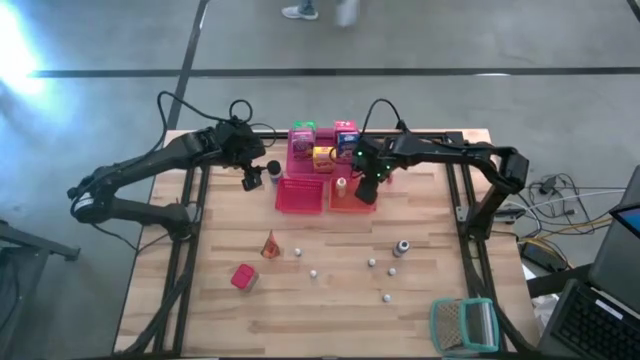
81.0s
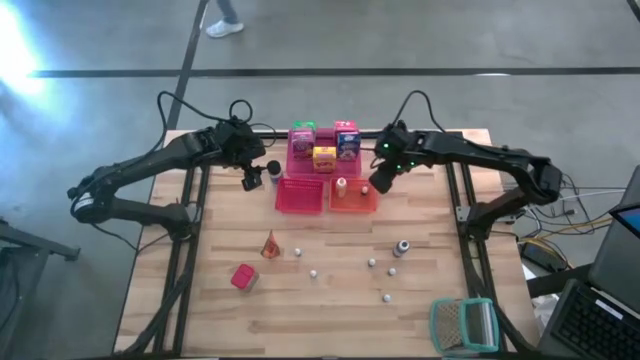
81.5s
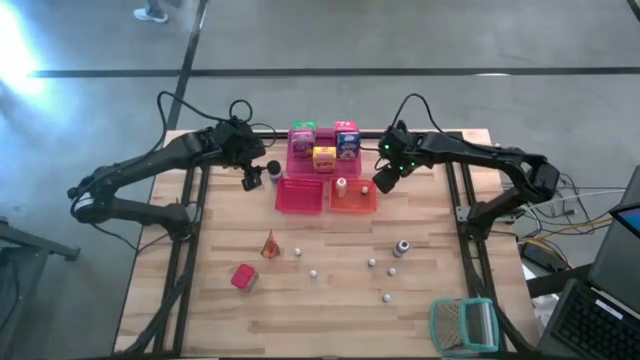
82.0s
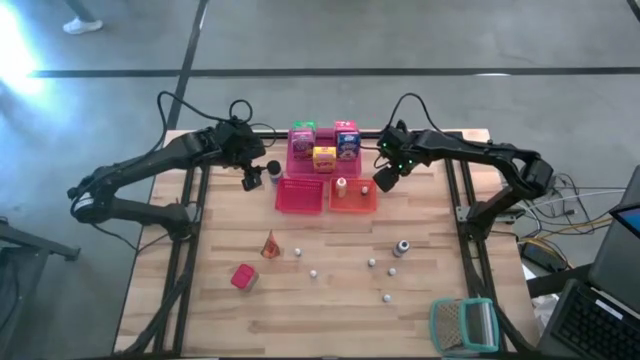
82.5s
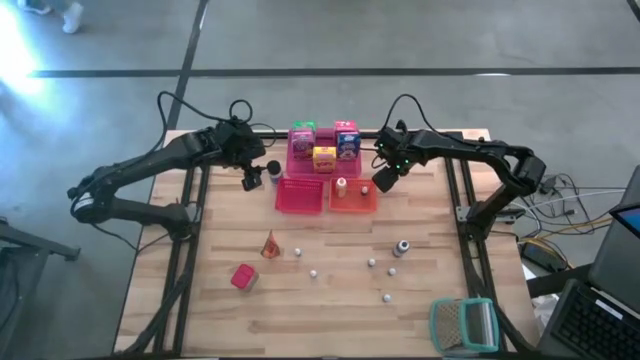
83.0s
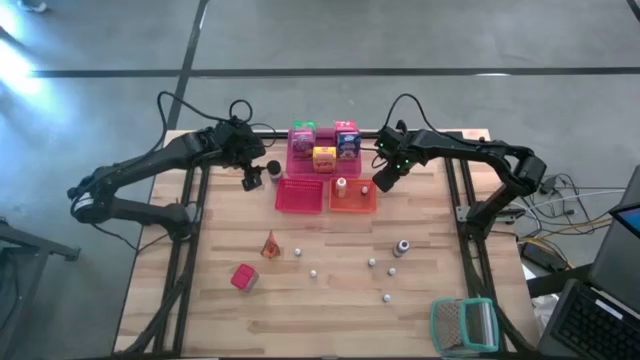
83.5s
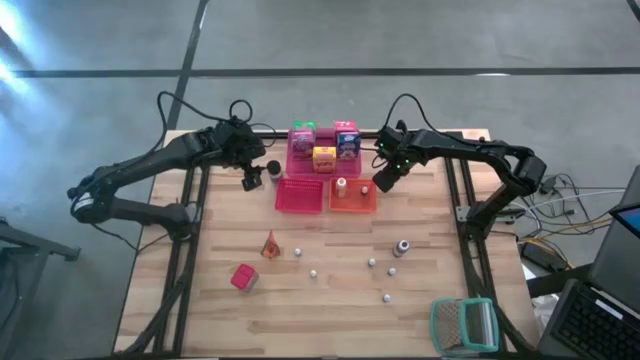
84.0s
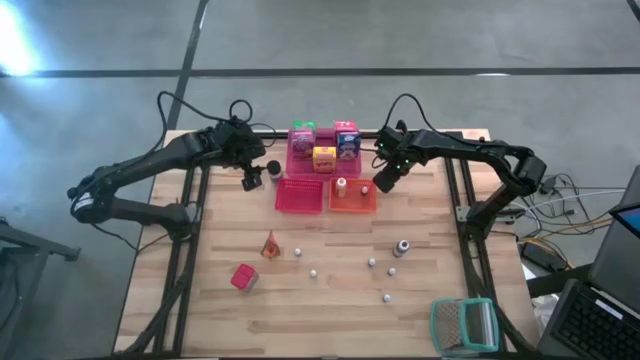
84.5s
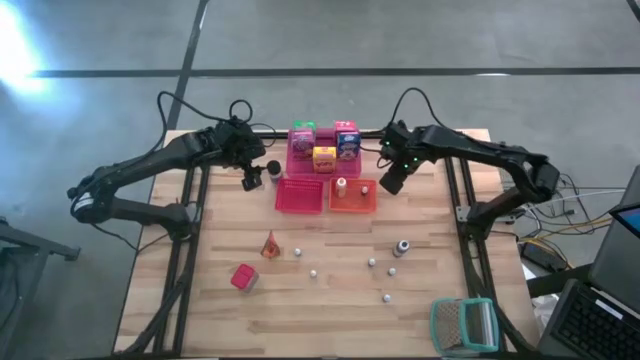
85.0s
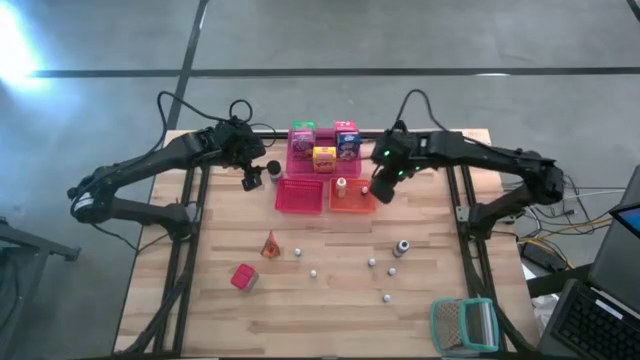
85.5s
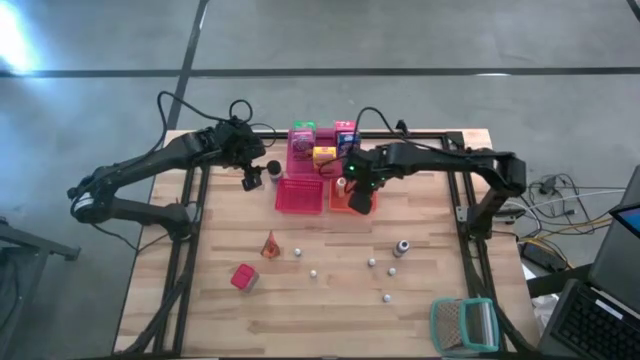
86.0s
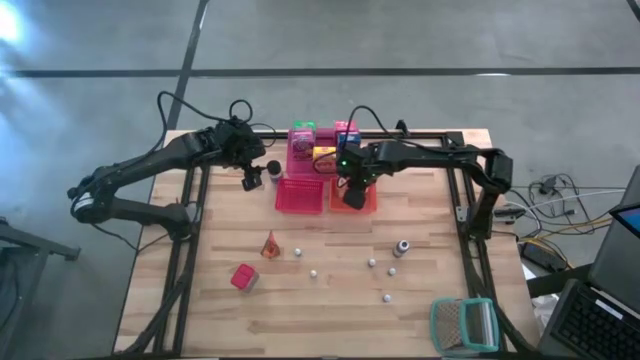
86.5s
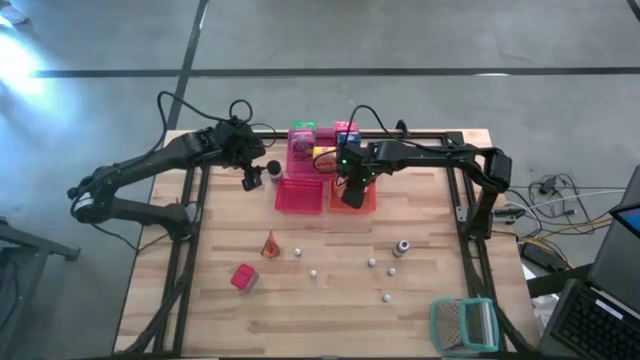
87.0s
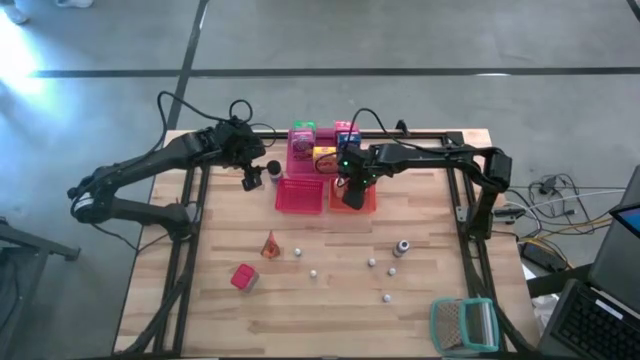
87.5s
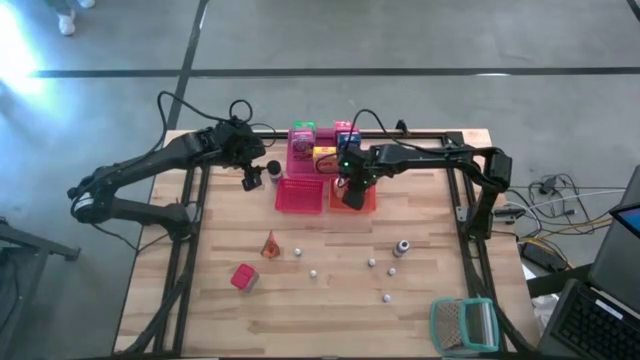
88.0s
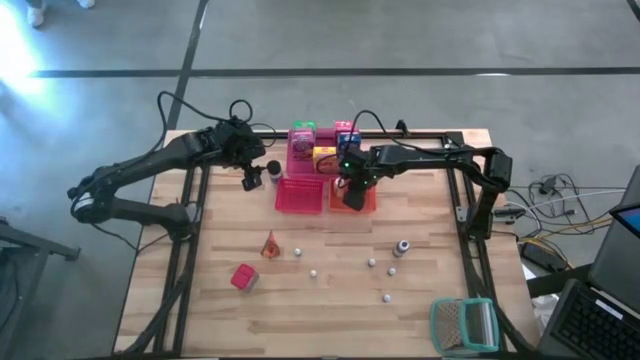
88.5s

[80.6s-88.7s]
Task: Pick & Place Kitchen Items
Put the small orange food coloring bottle into the orange bin

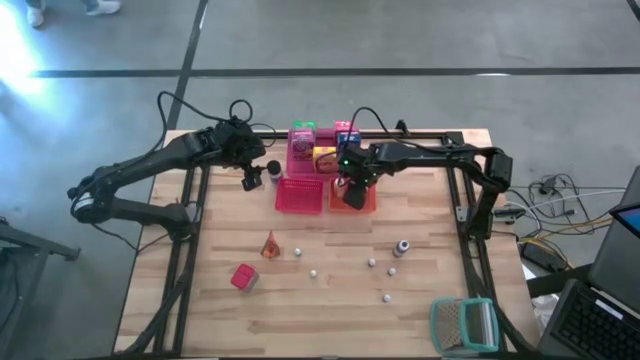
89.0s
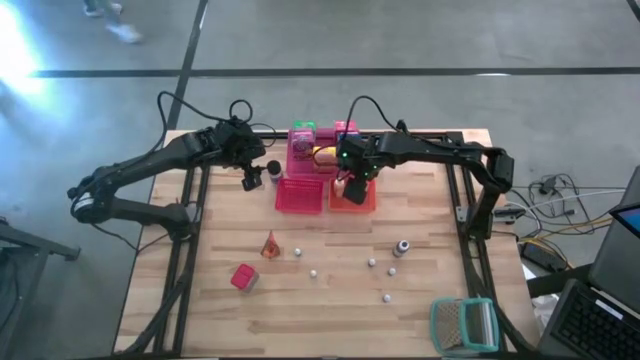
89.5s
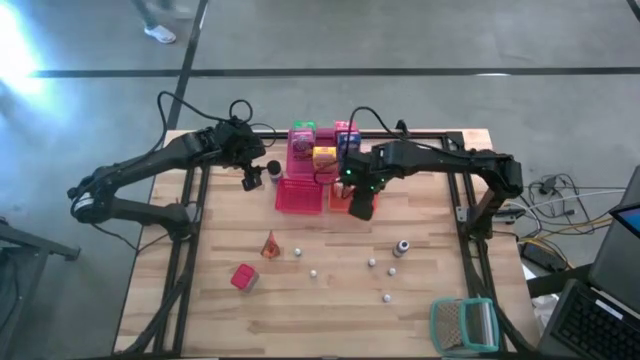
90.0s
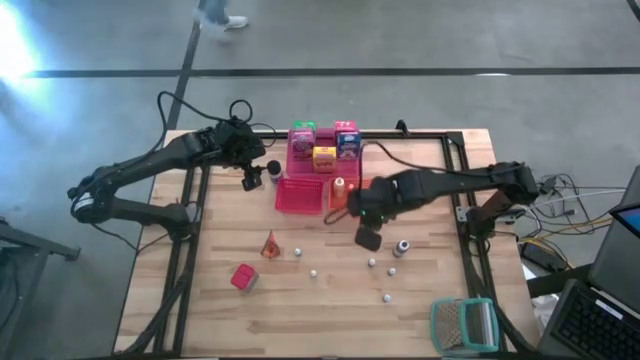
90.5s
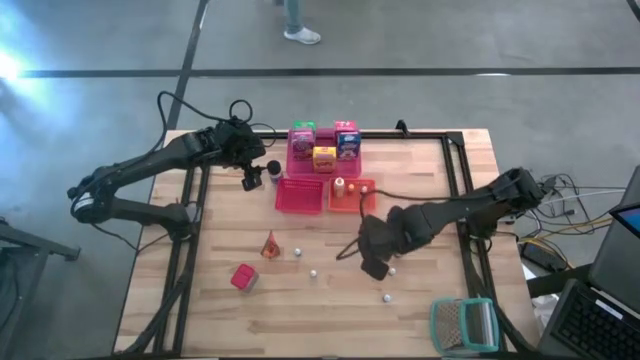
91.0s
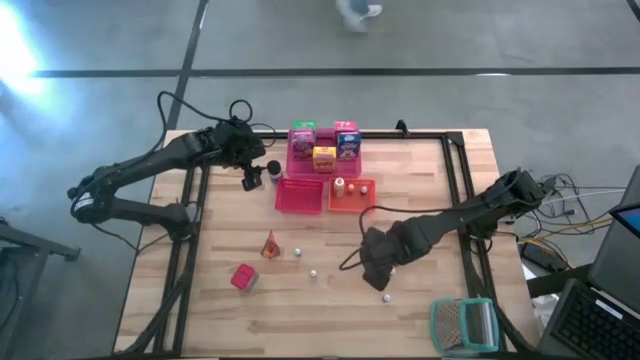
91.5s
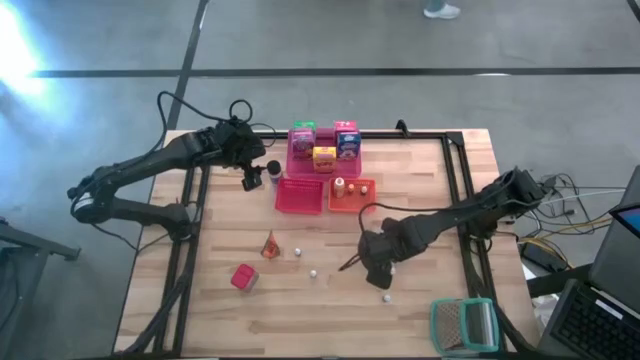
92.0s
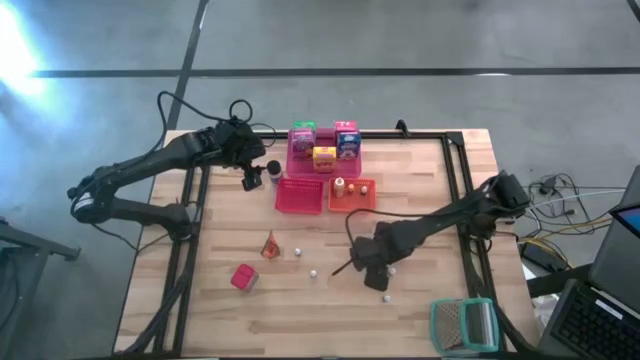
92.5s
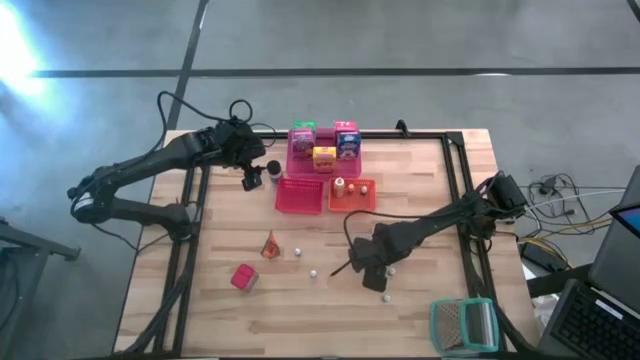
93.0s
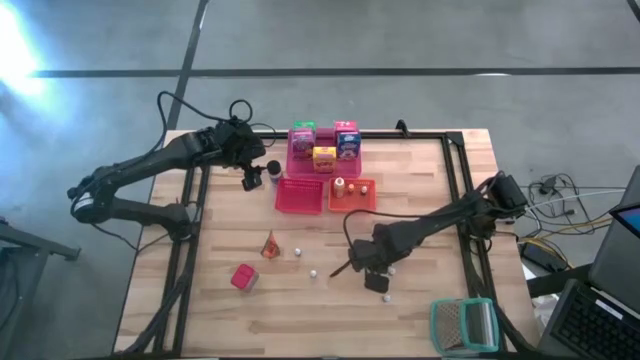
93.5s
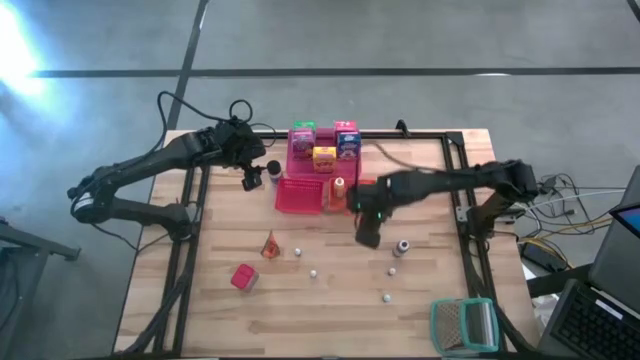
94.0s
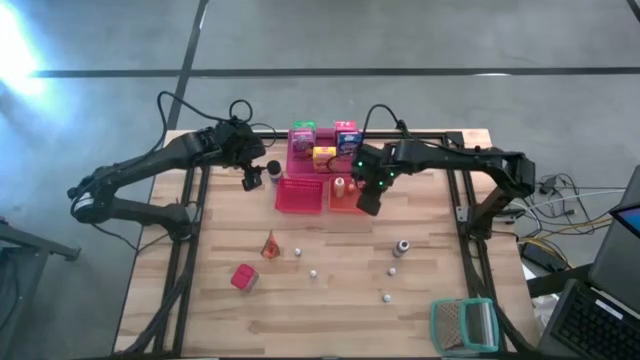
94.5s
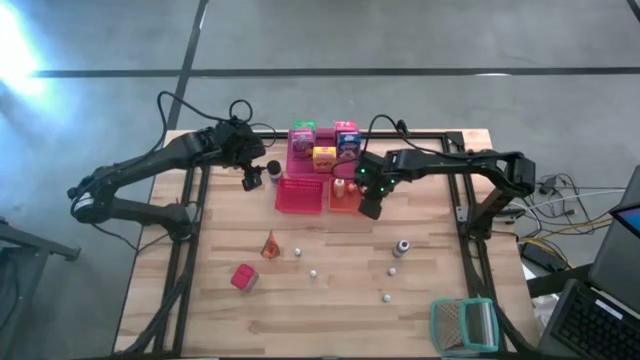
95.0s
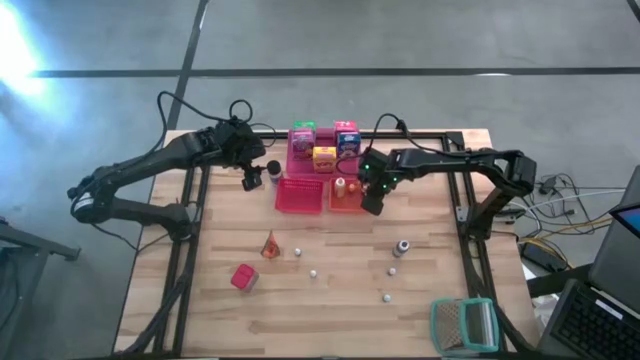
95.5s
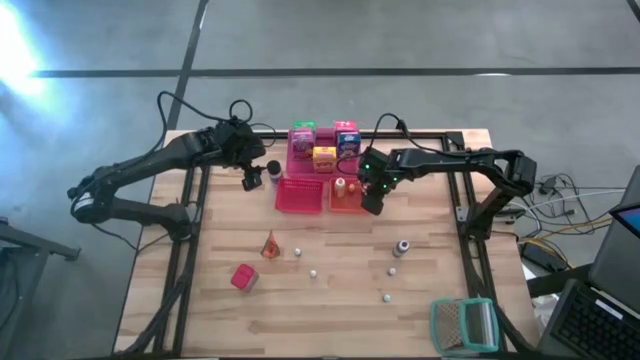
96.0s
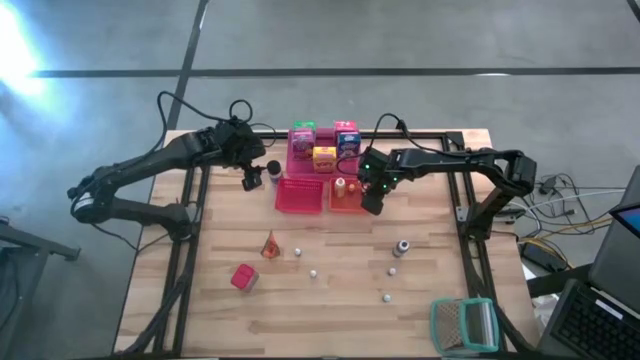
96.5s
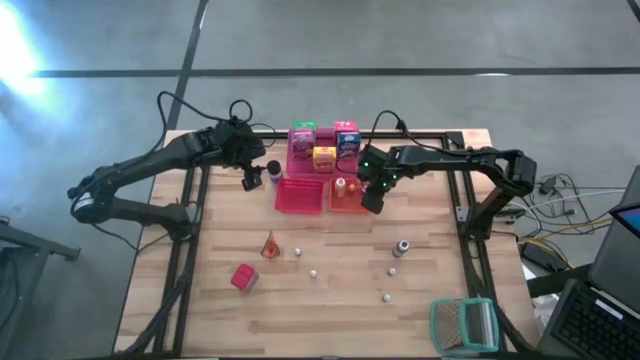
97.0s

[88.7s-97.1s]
Put the small green food coloring bottle into the orange bin

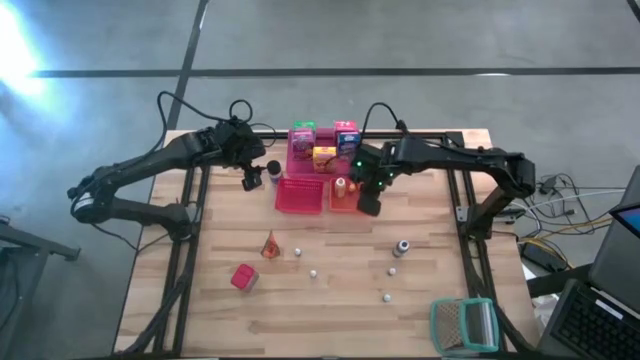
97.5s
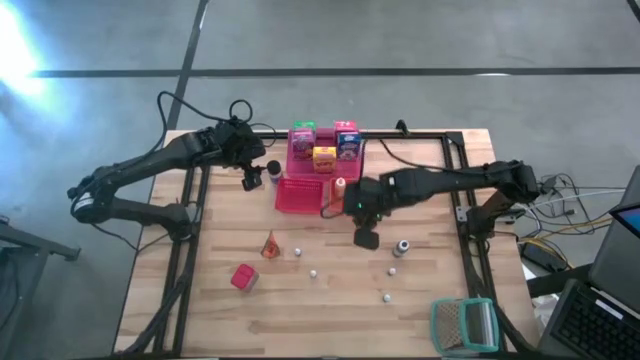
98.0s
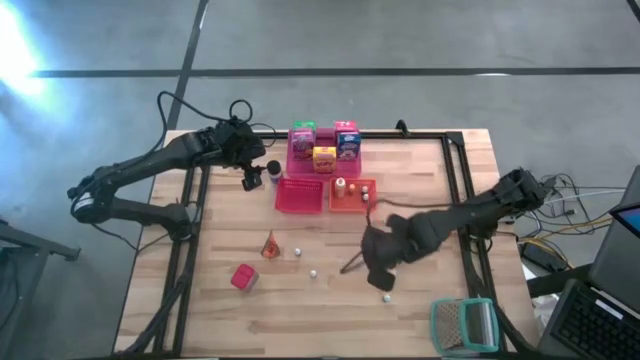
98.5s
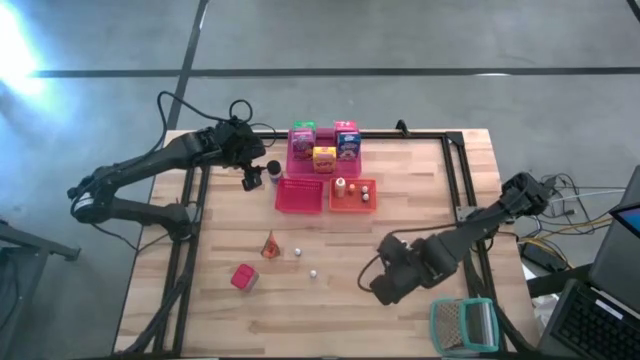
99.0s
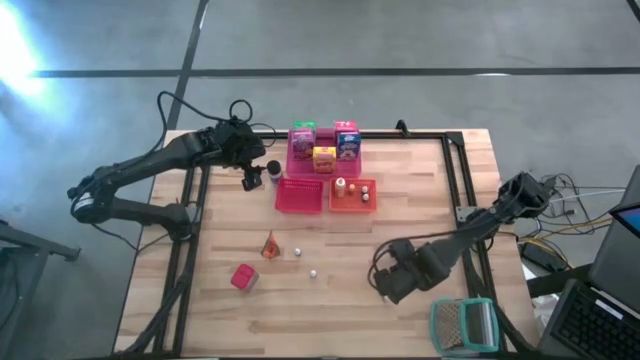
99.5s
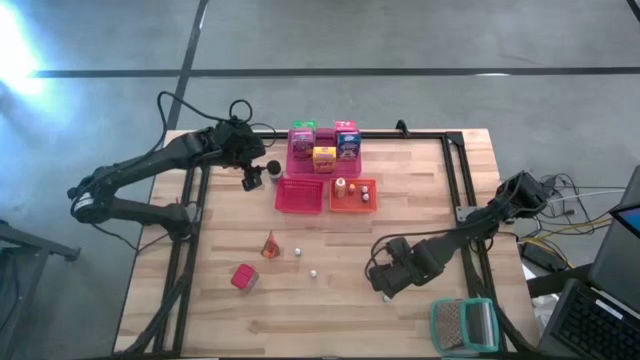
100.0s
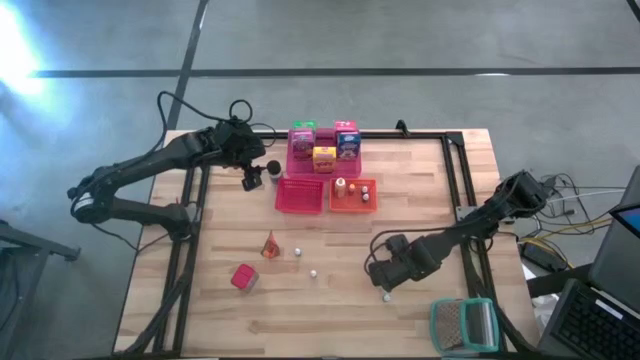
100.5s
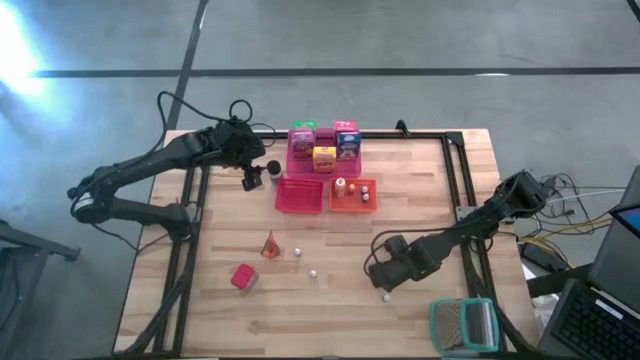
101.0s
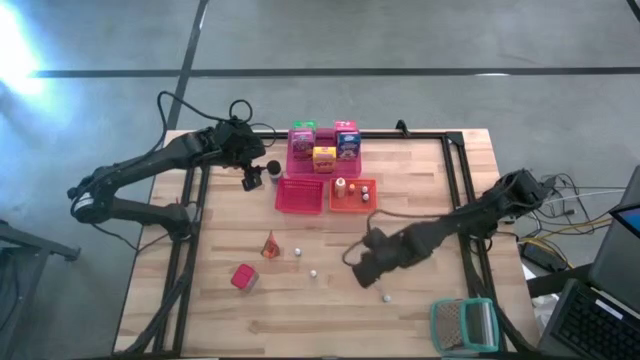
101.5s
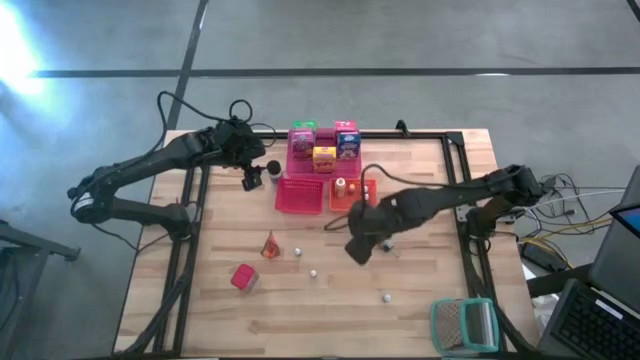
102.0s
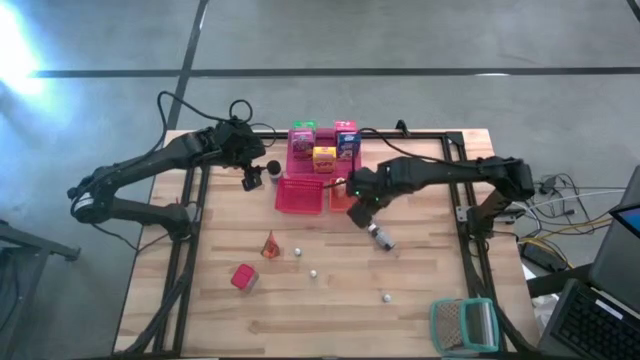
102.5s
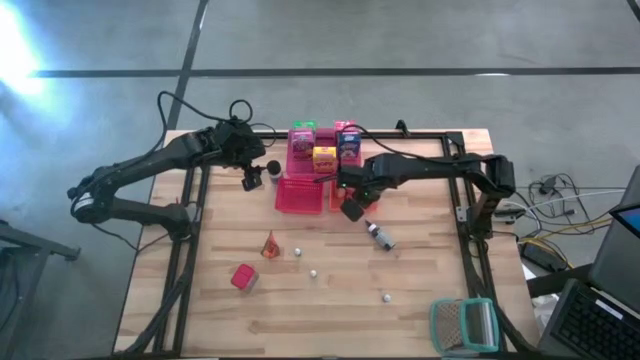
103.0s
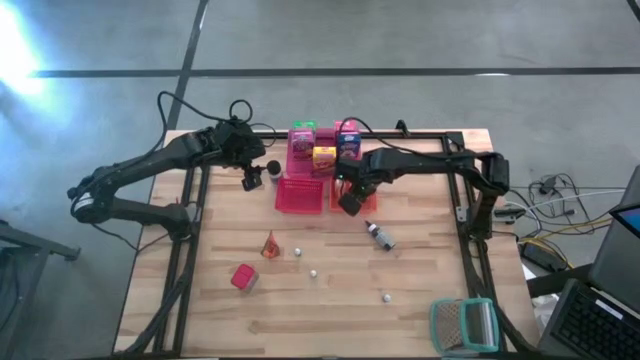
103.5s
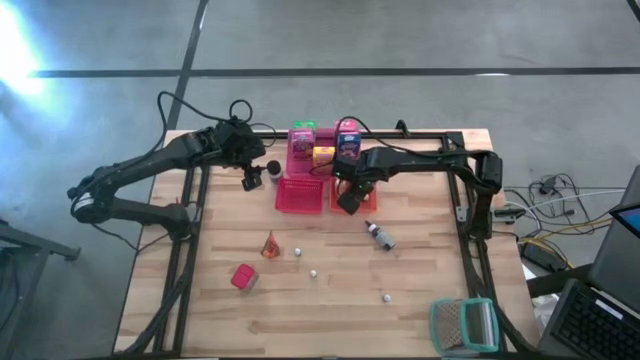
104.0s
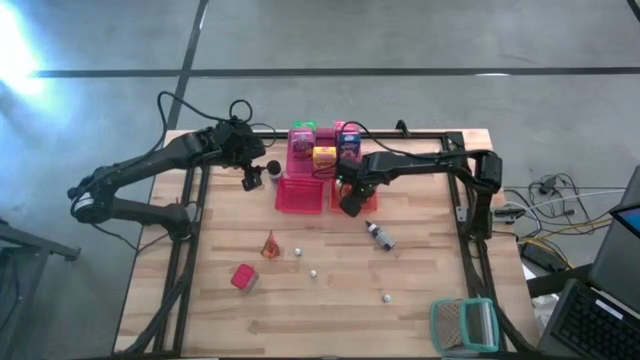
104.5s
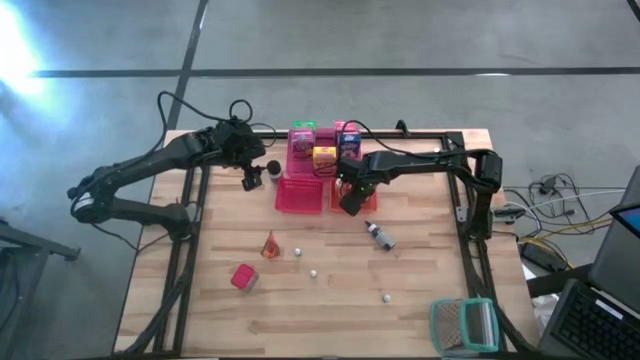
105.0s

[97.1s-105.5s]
Put the small black food coloring bottle into the orange bin
